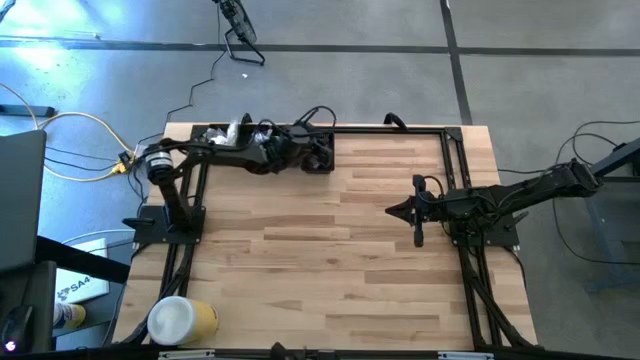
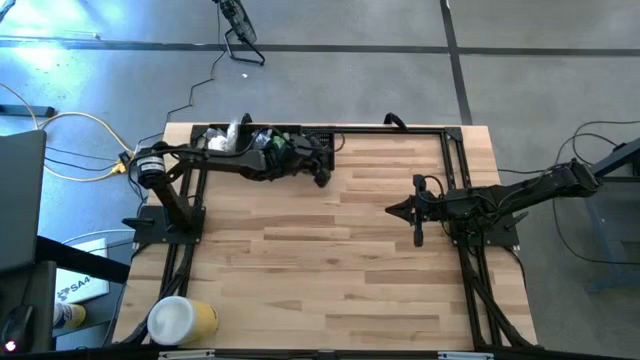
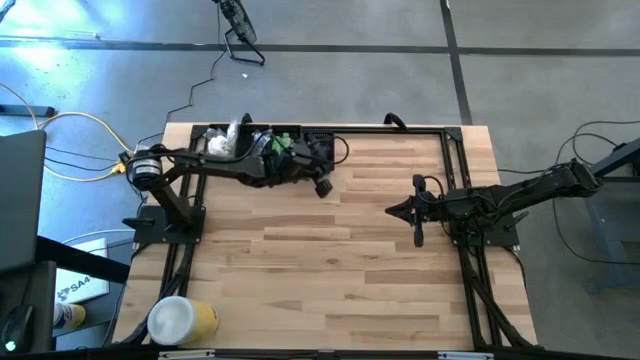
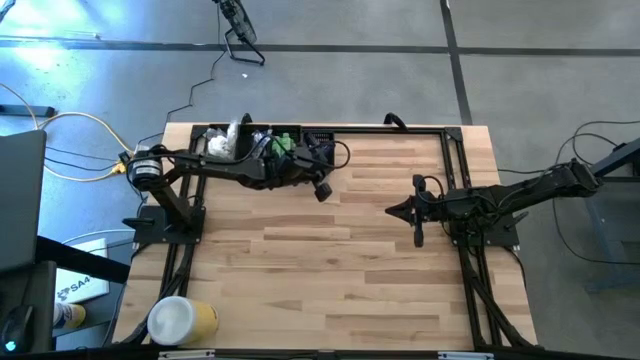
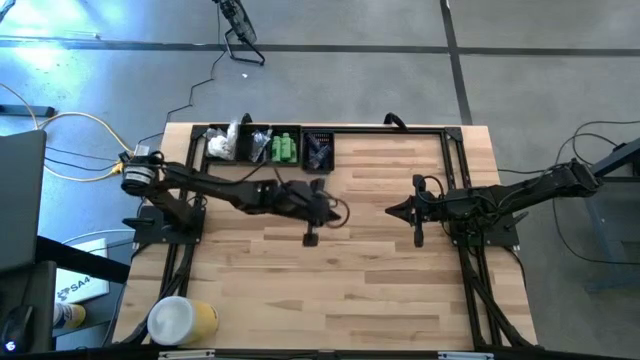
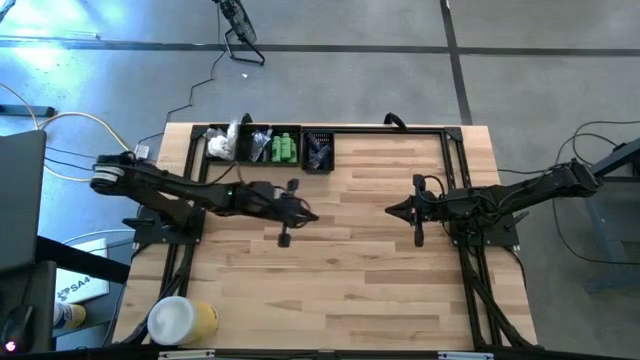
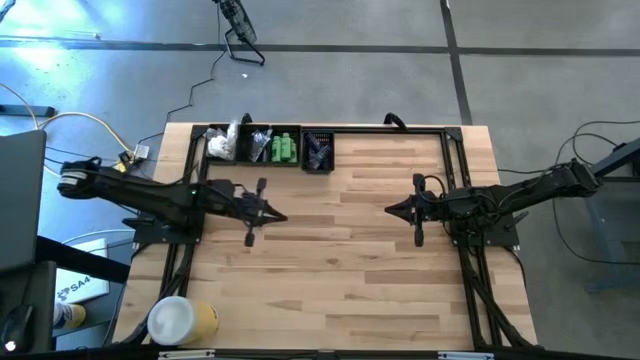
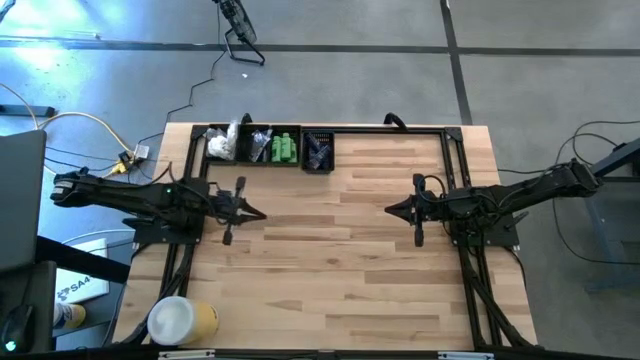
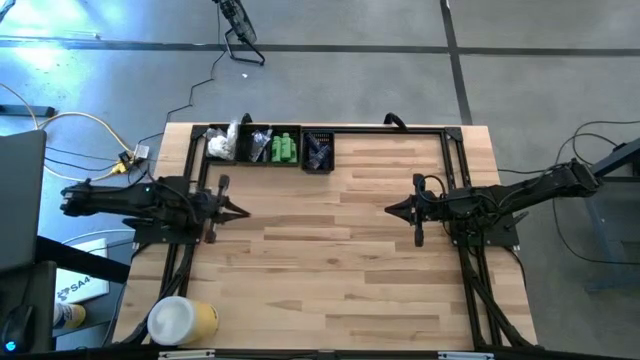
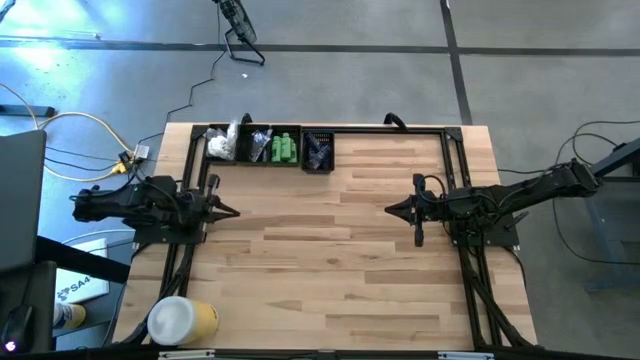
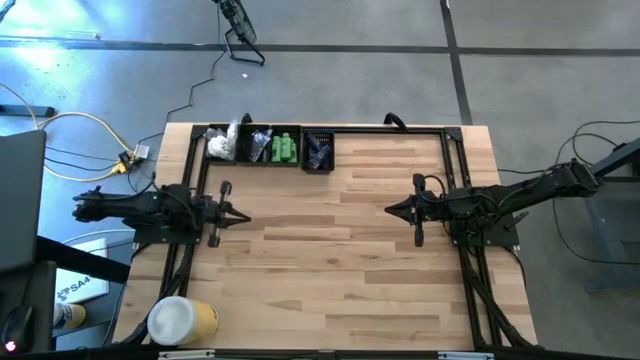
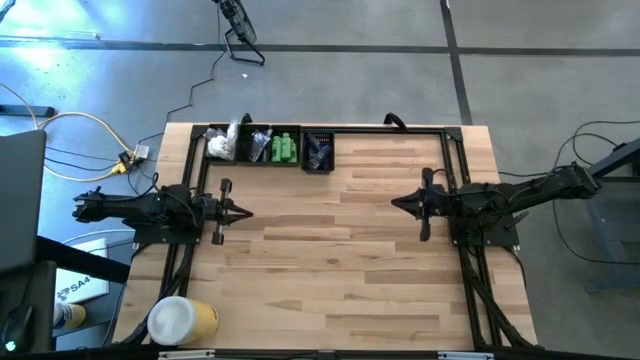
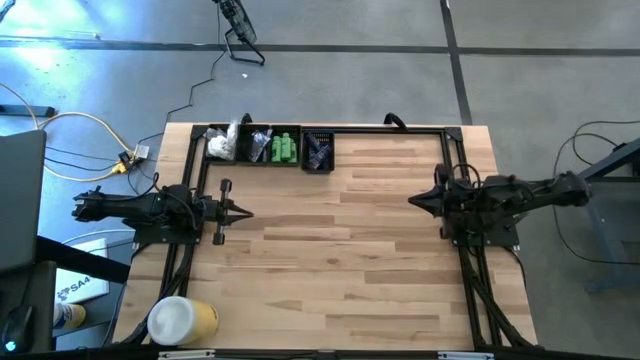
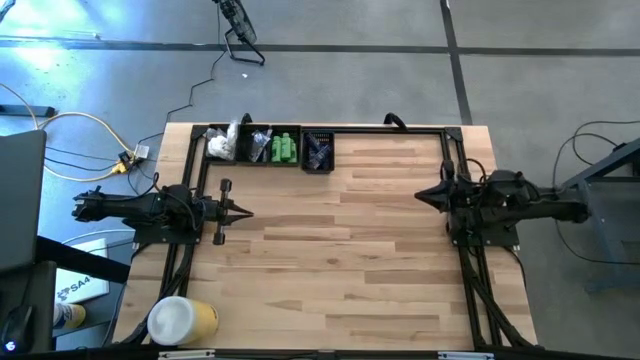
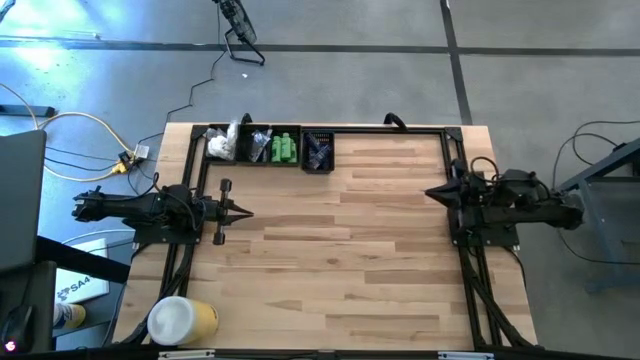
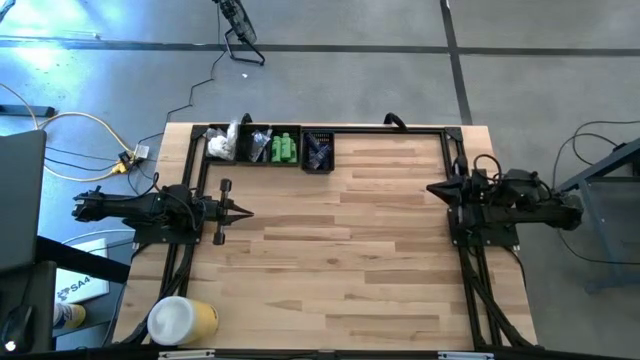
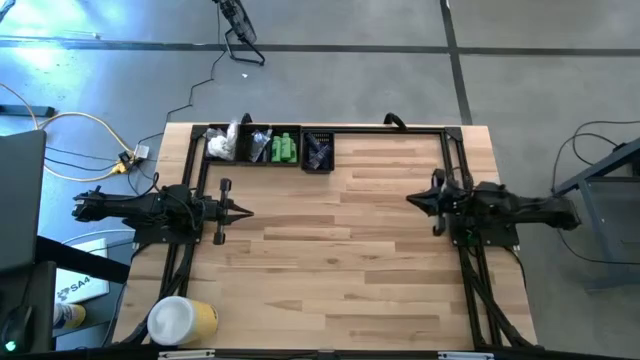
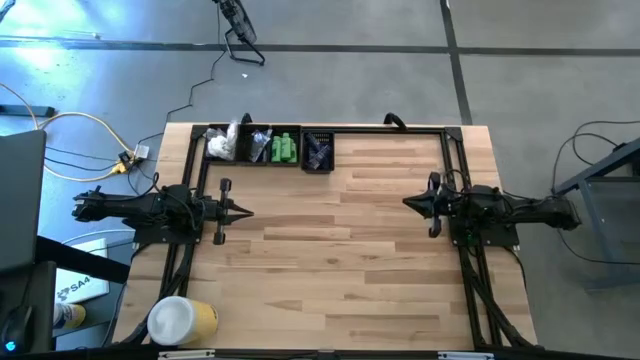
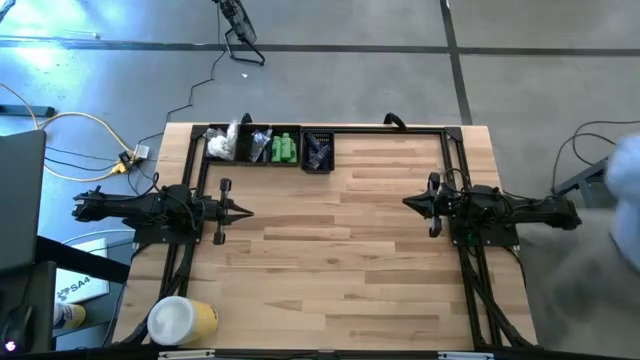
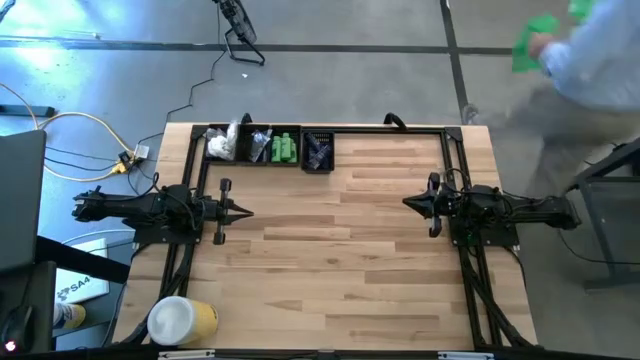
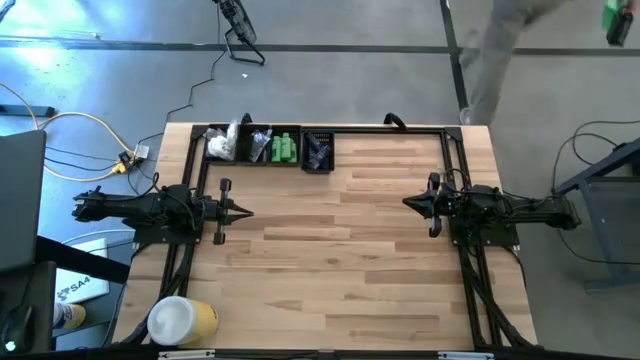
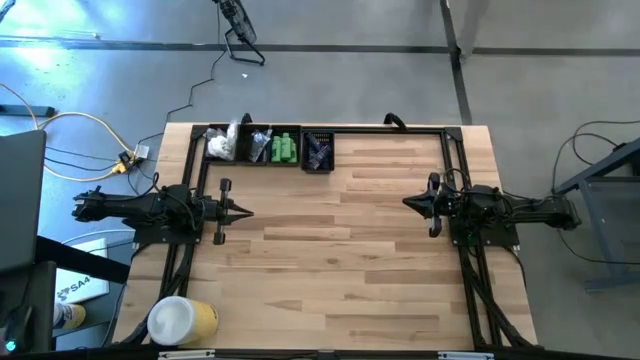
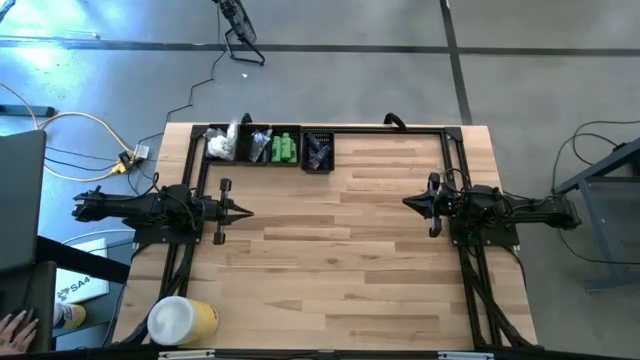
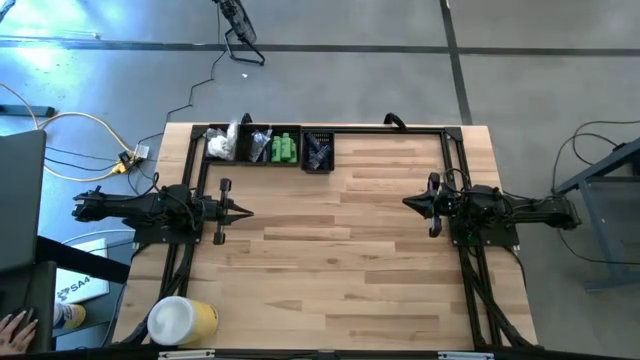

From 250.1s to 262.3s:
Task: Pick & Place Travel size toiletries
Return to Home Position

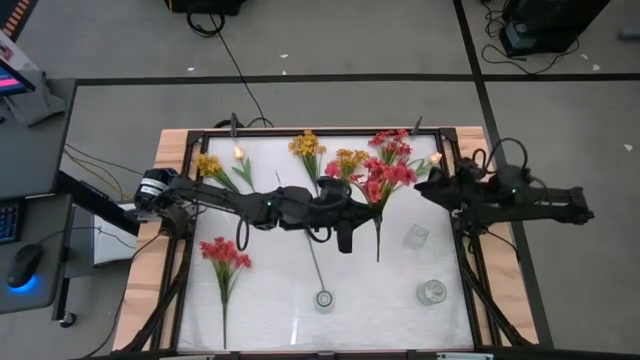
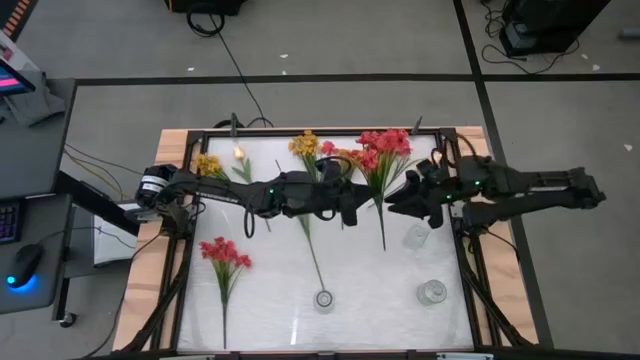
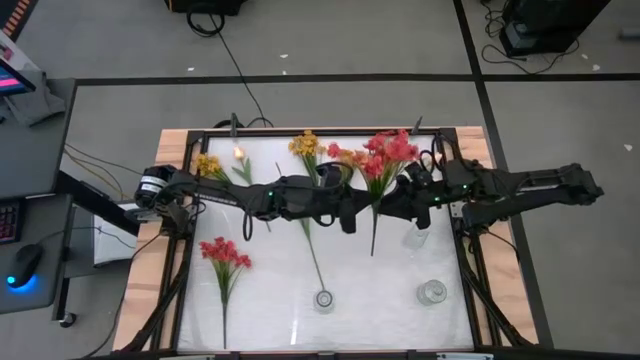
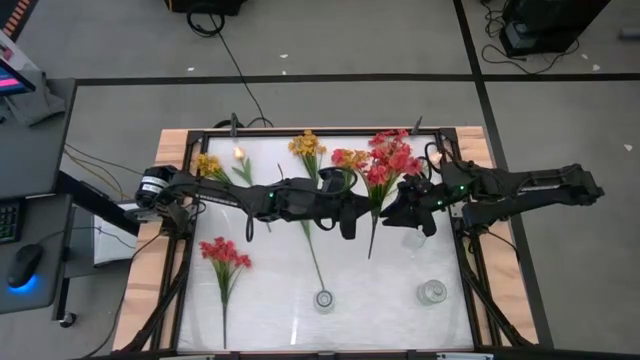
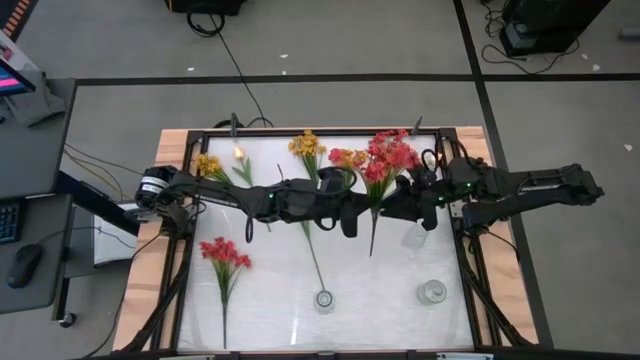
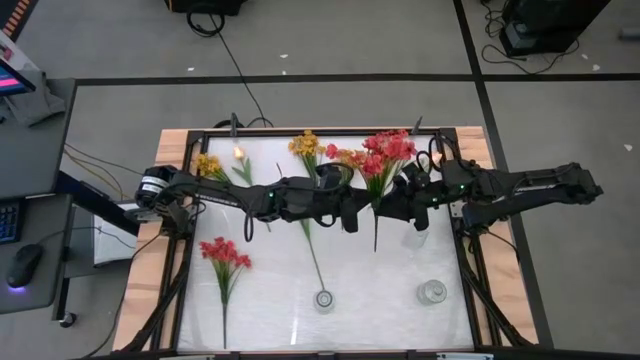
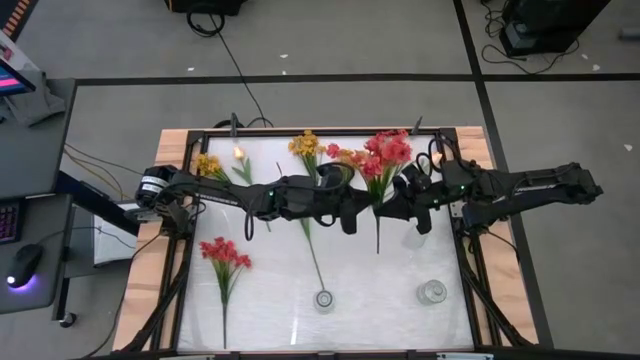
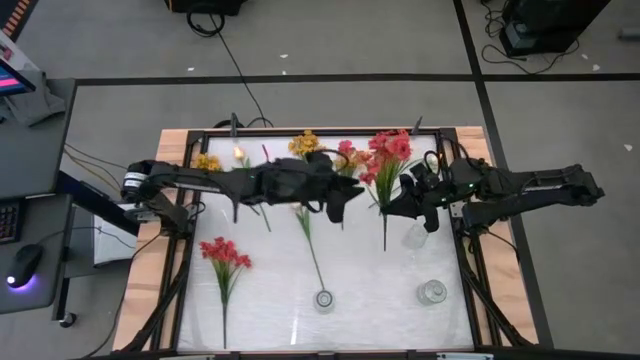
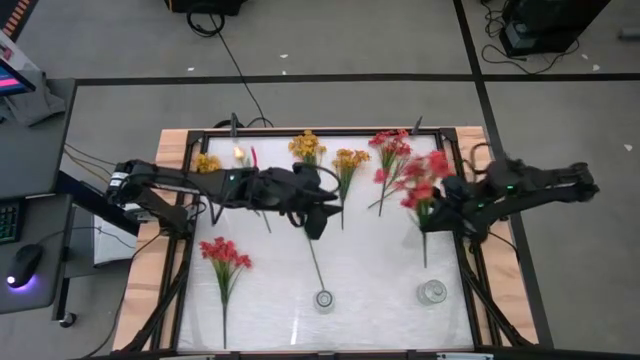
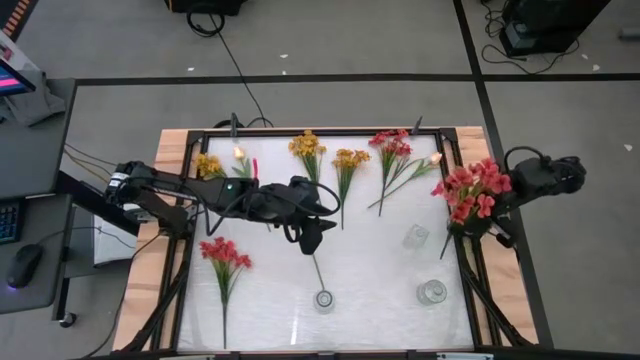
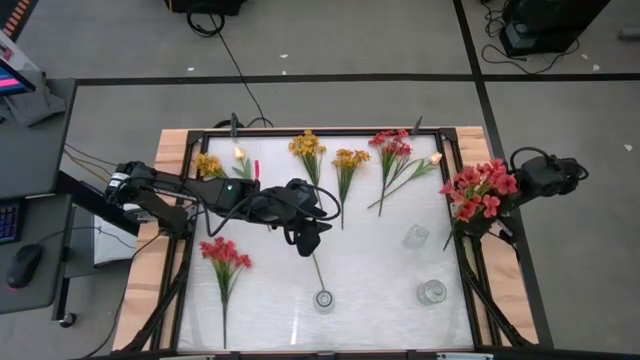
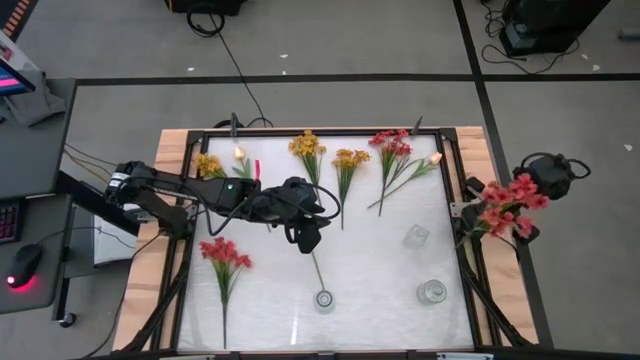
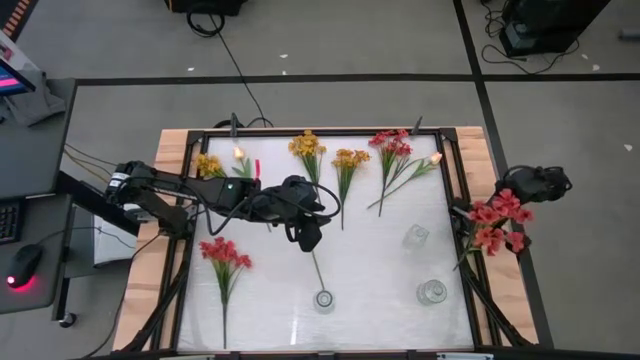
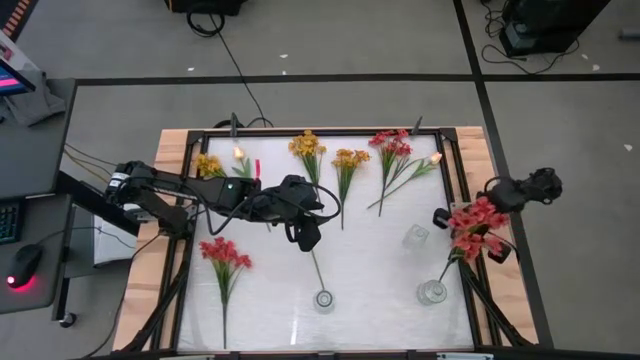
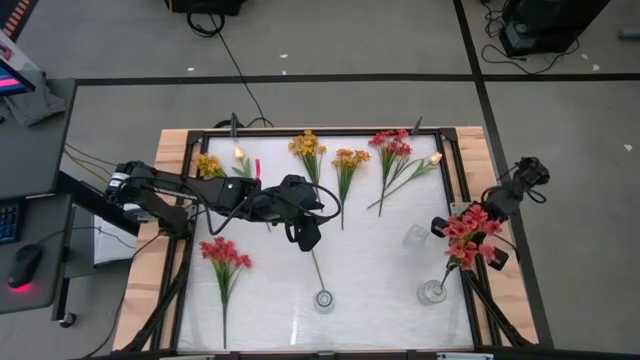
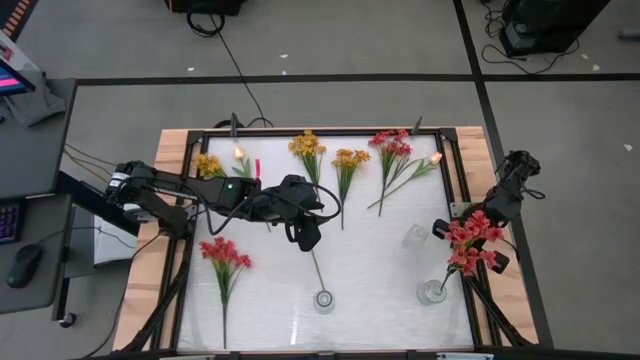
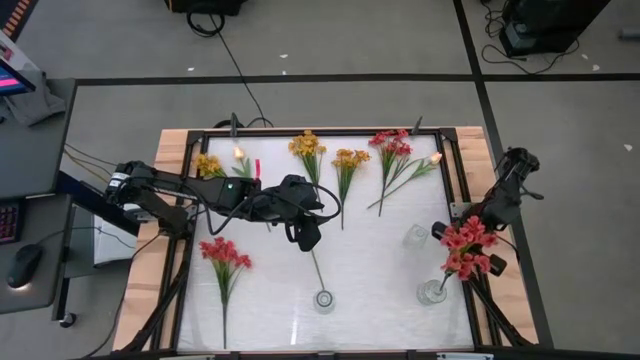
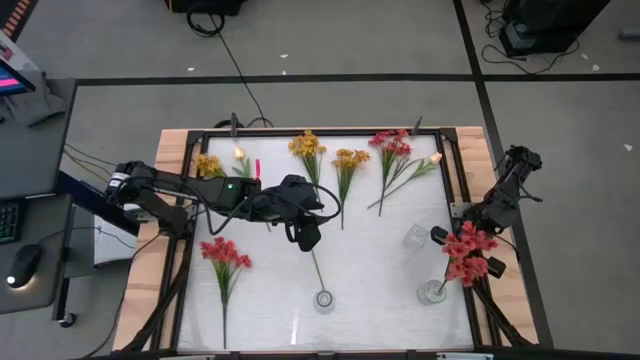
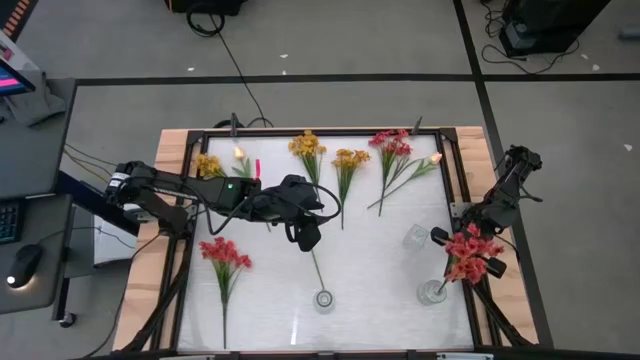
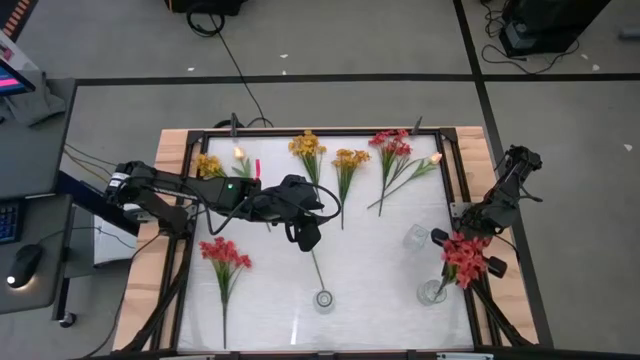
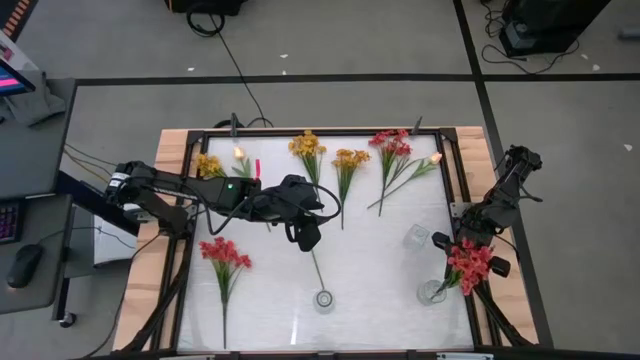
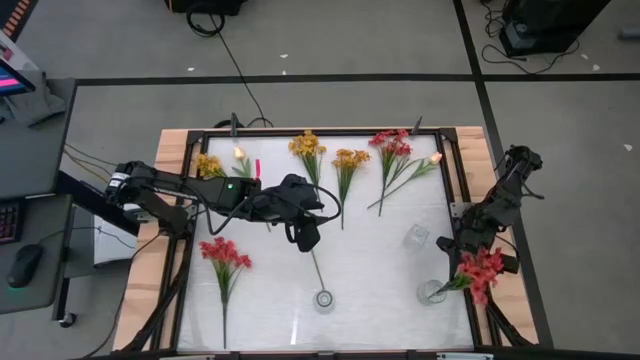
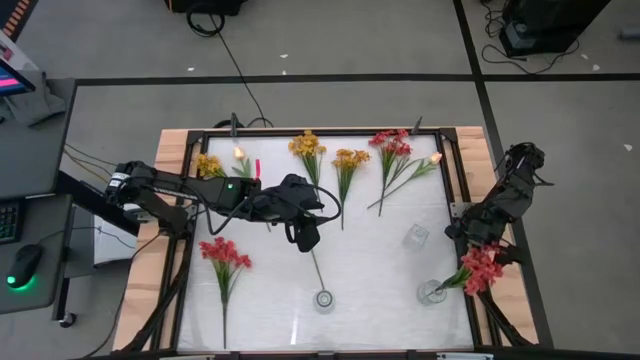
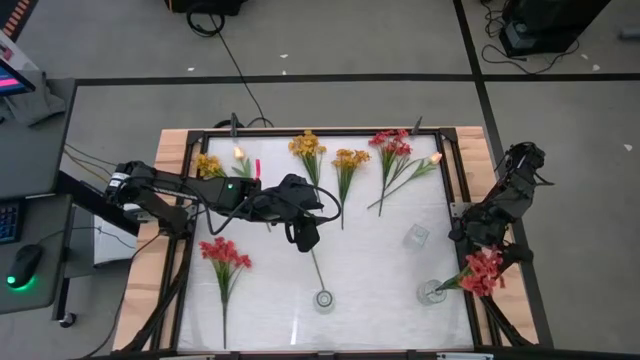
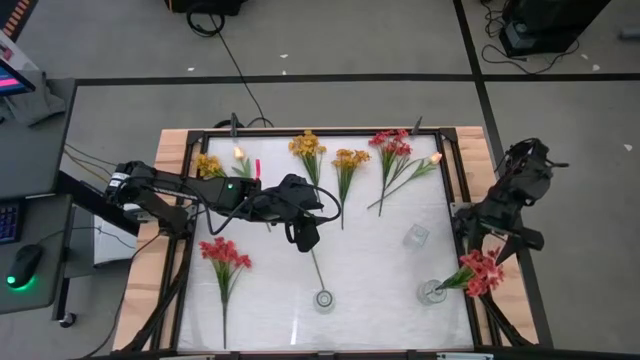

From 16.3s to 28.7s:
Task: Sort flowers into vase by color
Put the bottom right pink flowers into the bottom right transparent vase
